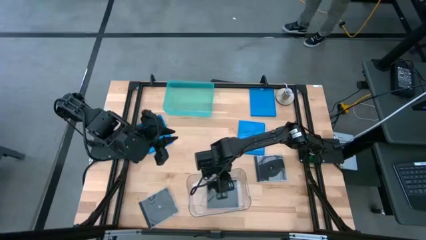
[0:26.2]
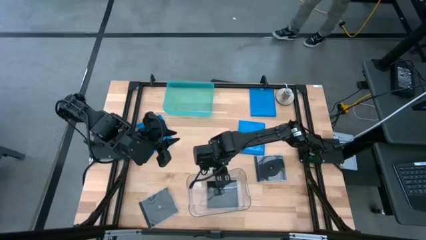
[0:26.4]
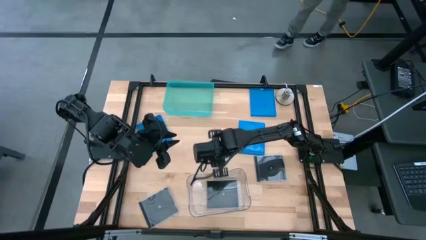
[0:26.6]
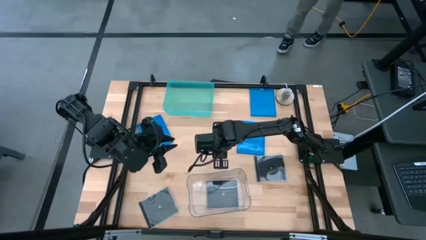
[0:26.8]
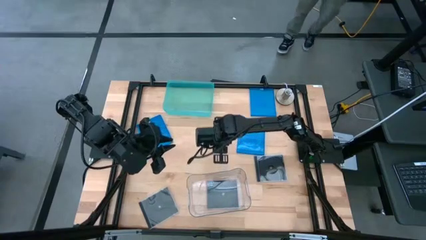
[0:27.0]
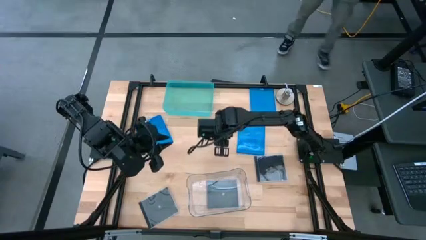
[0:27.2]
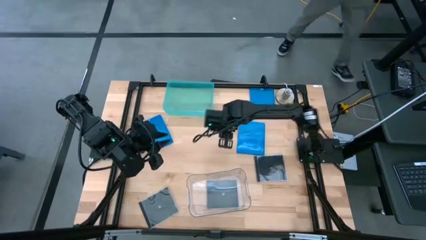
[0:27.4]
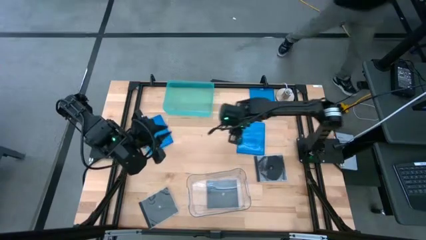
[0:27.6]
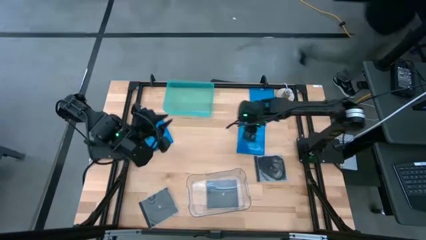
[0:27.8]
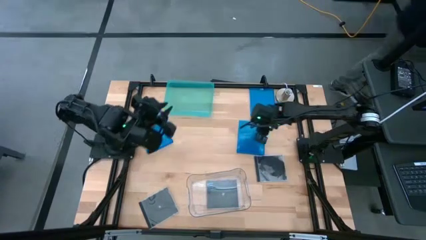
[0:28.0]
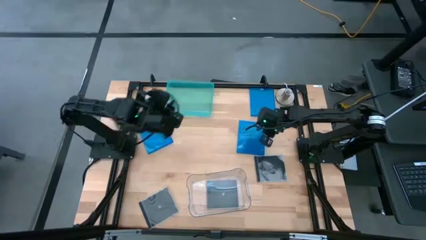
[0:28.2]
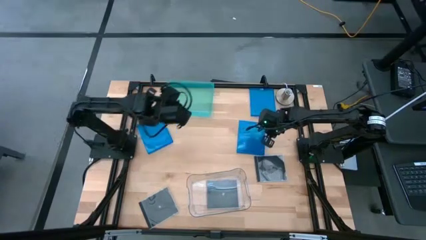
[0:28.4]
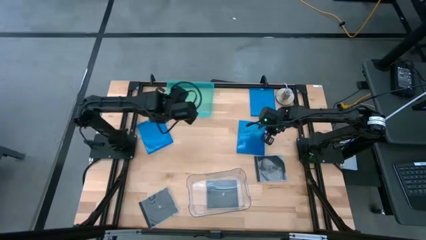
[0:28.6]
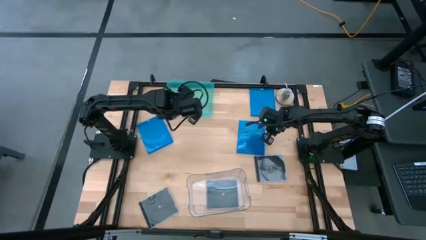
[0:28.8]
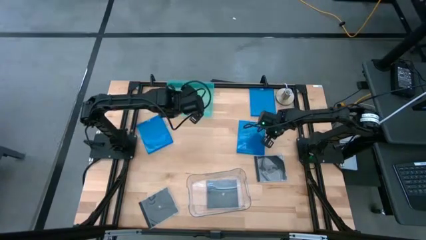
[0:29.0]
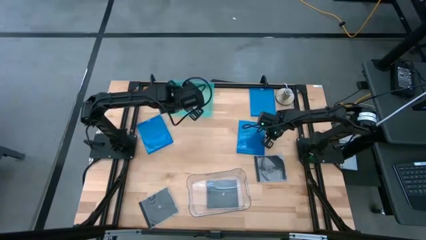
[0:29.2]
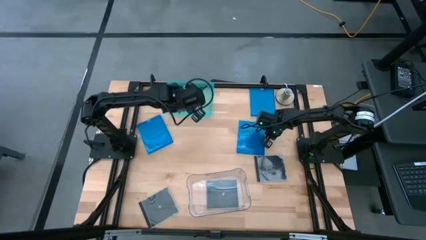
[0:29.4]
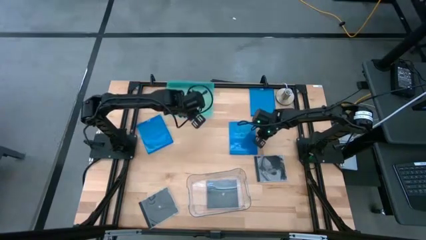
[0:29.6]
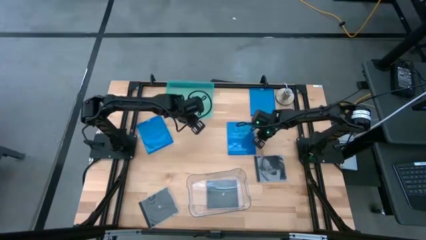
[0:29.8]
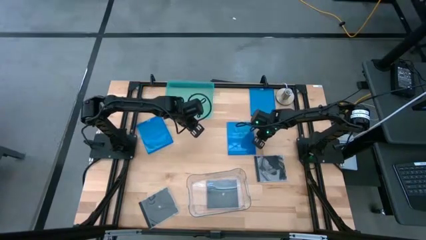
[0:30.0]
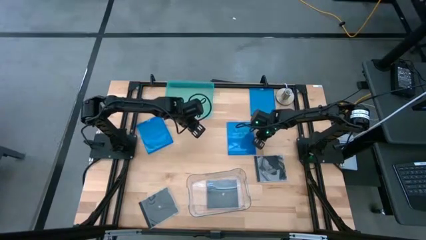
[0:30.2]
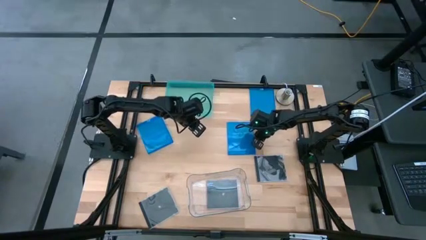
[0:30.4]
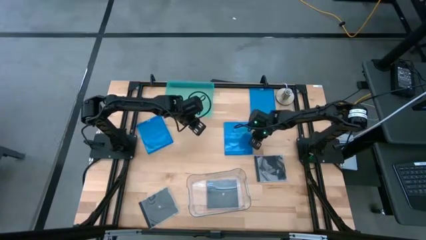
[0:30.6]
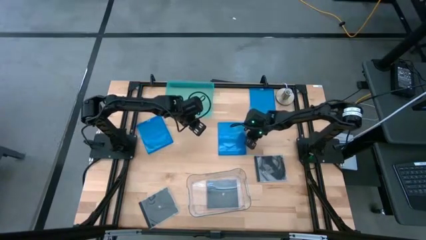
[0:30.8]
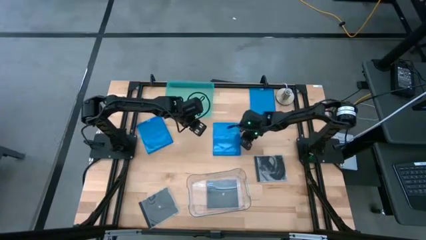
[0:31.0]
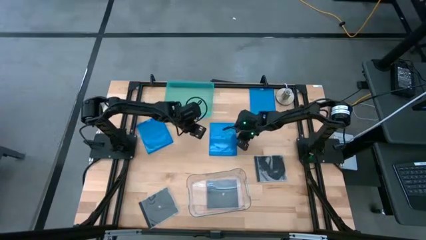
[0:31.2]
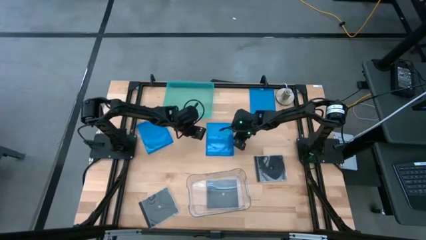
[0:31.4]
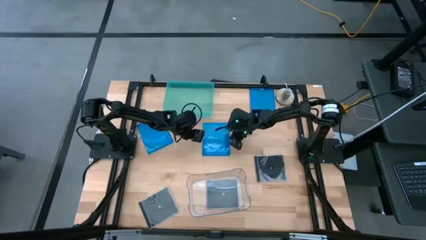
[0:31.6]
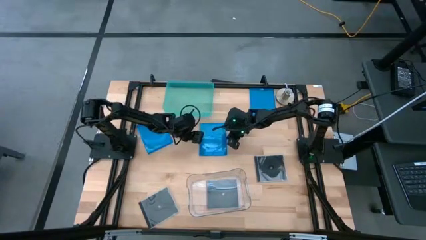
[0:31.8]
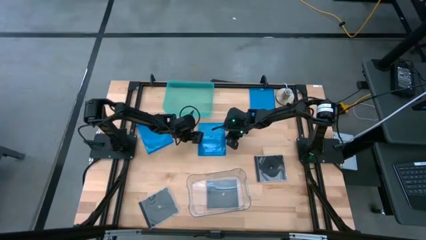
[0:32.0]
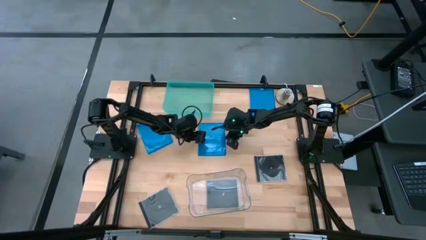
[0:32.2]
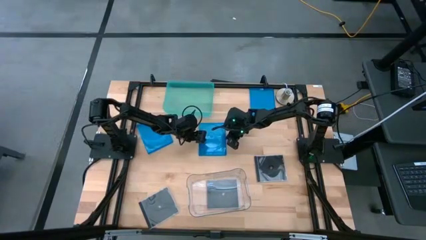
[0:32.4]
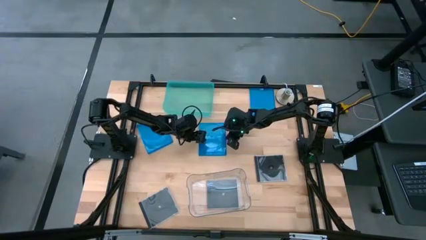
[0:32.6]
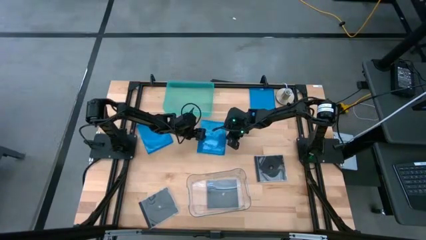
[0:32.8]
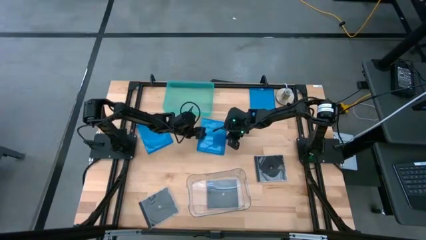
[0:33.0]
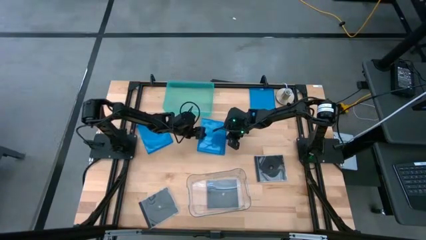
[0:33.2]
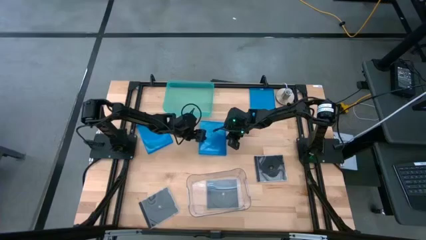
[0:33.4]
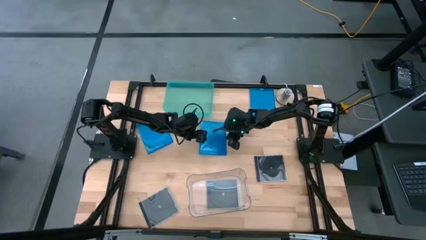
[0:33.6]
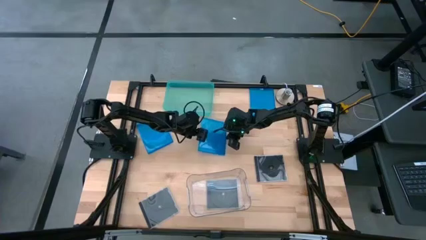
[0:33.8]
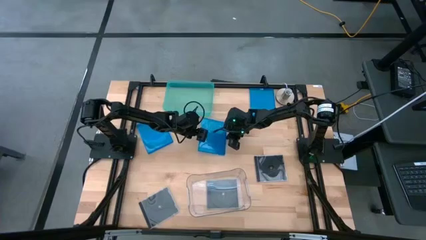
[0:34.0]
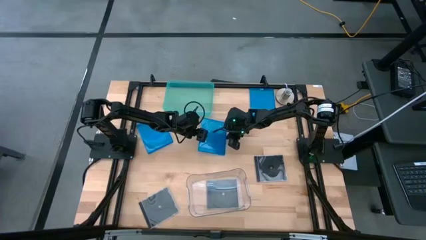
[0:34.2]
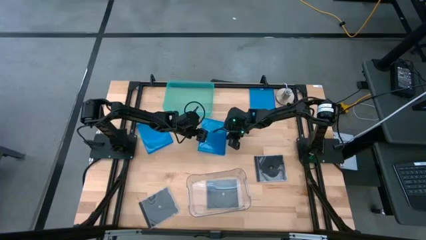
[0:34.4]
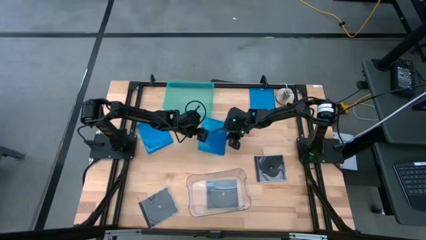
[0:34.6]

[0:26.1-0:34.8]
Task: Pick & place jewel cases by type
Put the bottom right blue CD case into the green bin
